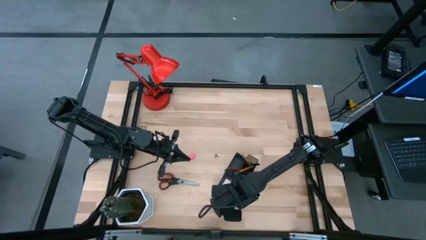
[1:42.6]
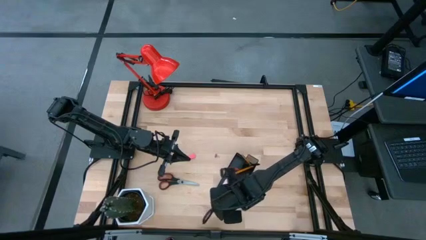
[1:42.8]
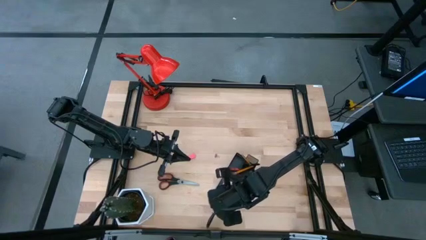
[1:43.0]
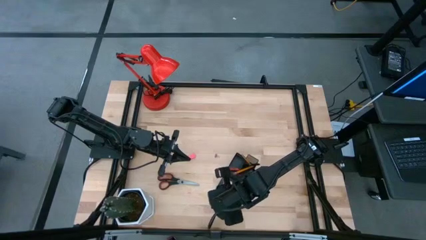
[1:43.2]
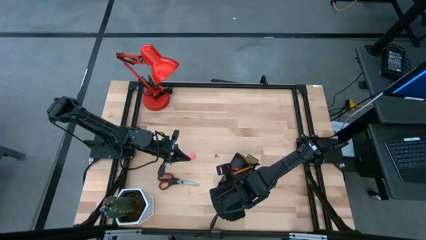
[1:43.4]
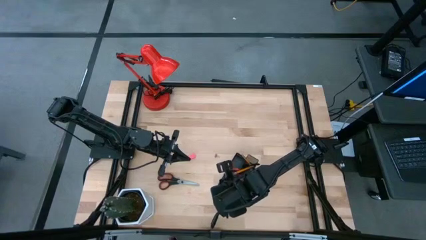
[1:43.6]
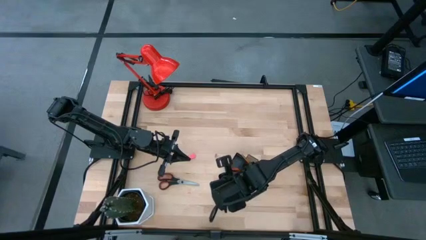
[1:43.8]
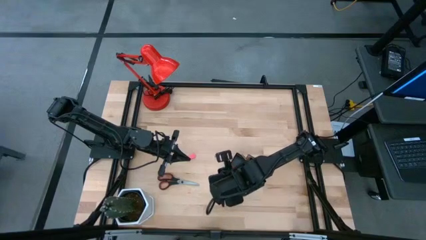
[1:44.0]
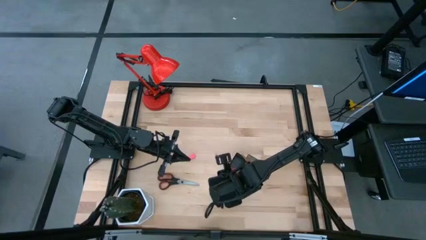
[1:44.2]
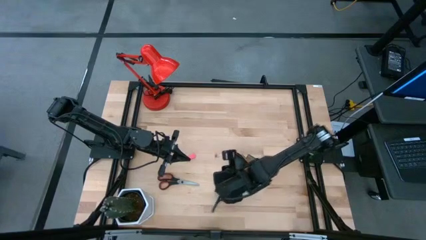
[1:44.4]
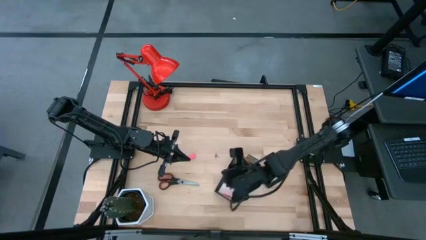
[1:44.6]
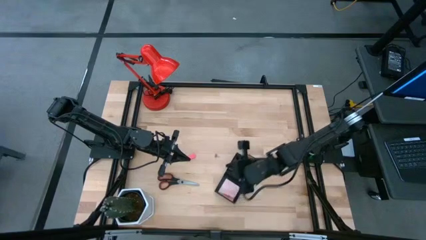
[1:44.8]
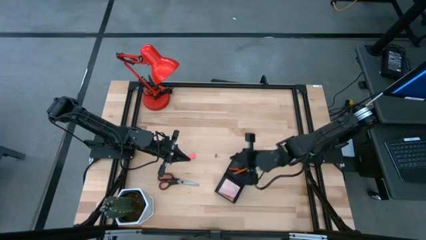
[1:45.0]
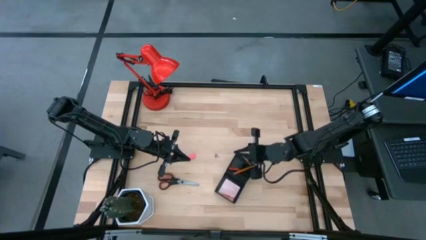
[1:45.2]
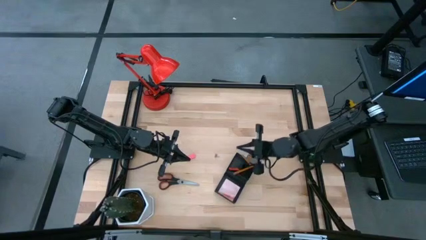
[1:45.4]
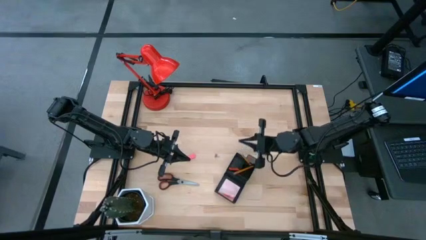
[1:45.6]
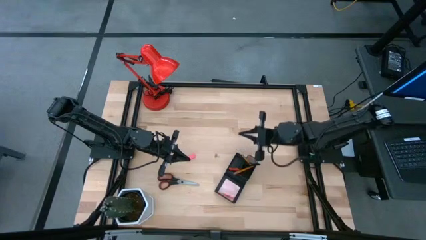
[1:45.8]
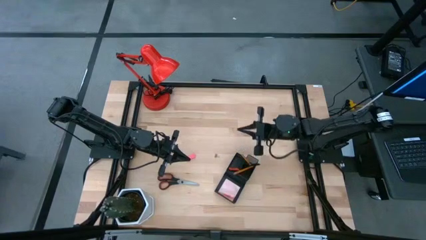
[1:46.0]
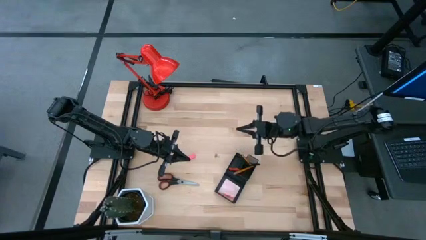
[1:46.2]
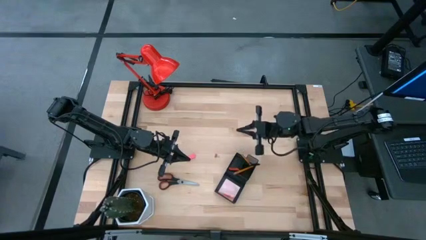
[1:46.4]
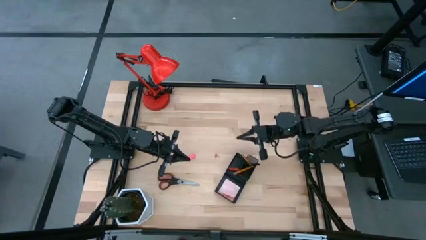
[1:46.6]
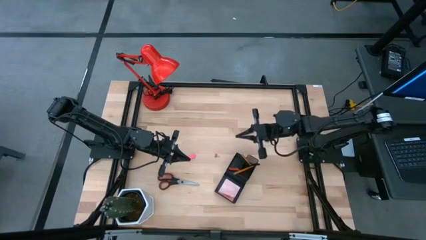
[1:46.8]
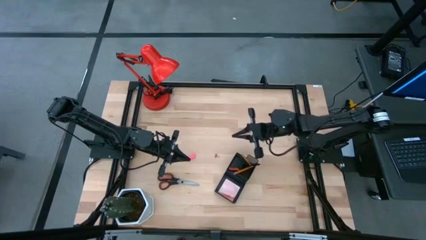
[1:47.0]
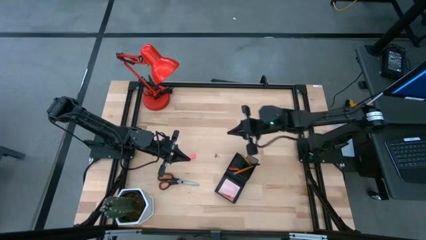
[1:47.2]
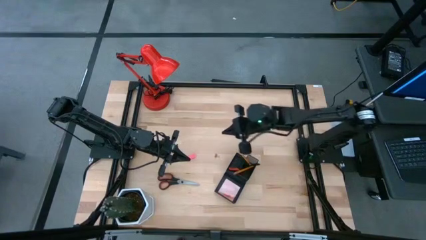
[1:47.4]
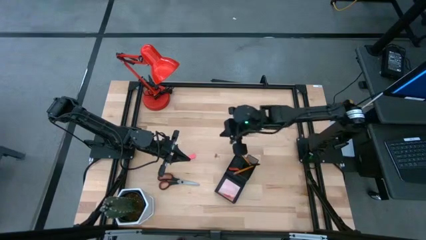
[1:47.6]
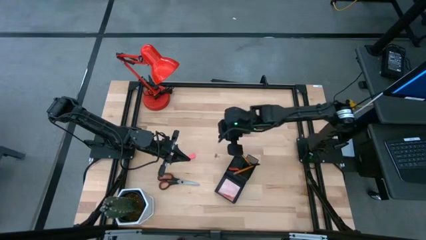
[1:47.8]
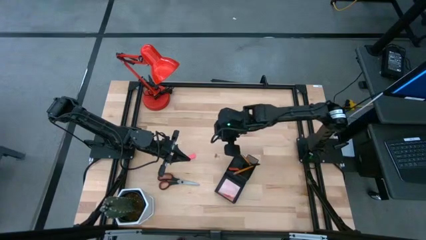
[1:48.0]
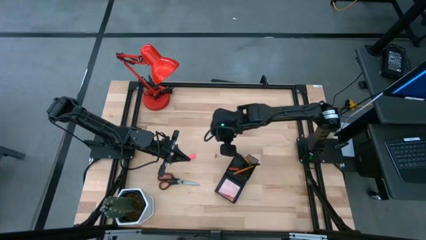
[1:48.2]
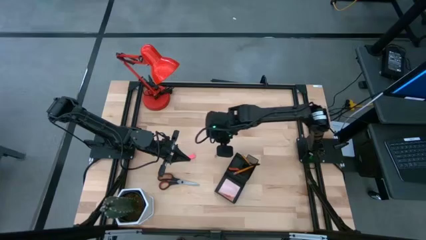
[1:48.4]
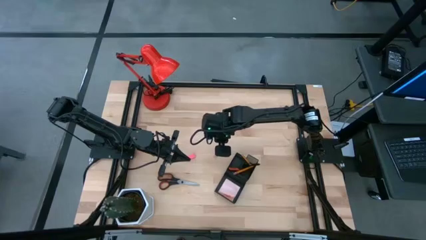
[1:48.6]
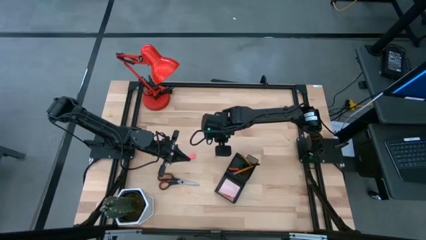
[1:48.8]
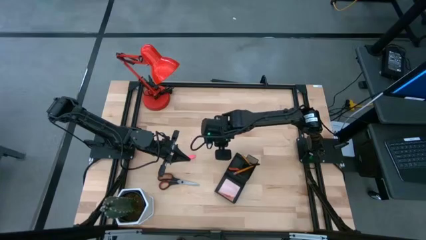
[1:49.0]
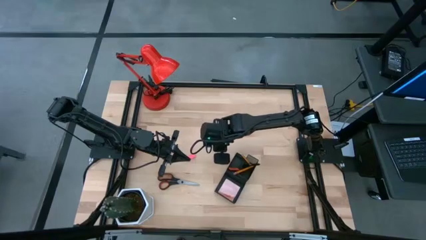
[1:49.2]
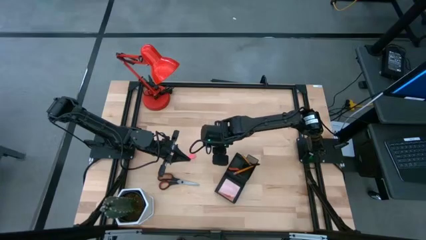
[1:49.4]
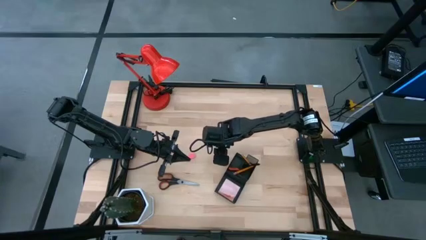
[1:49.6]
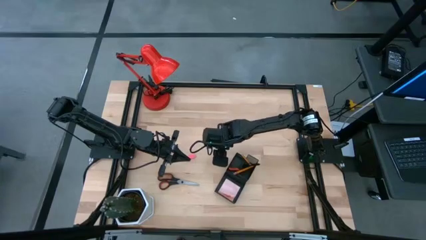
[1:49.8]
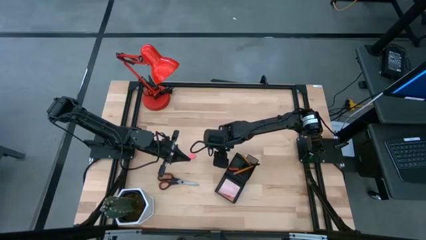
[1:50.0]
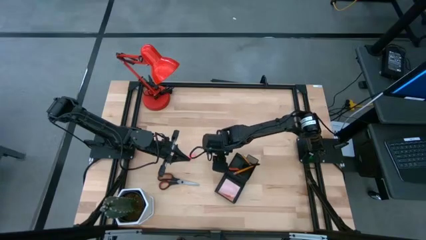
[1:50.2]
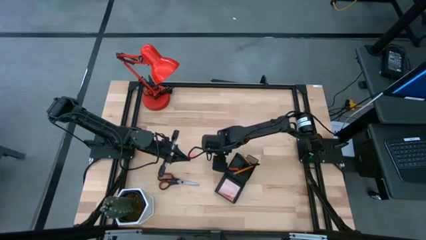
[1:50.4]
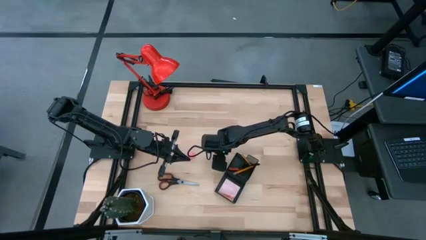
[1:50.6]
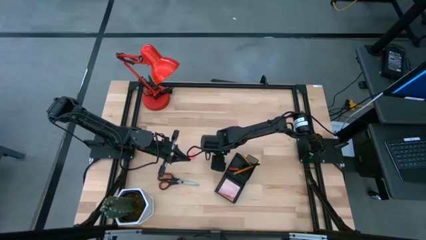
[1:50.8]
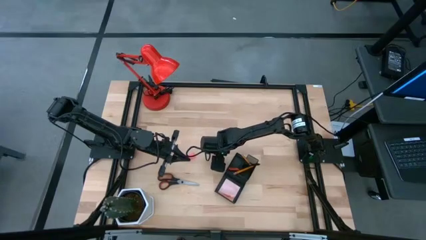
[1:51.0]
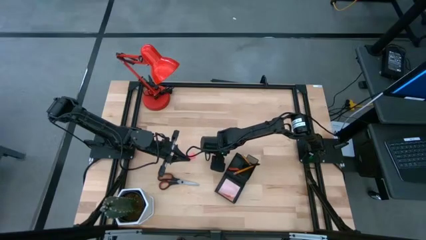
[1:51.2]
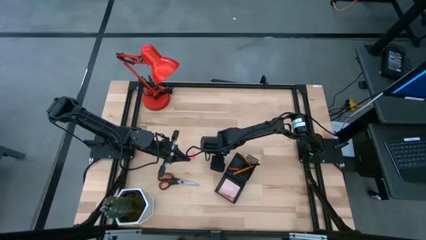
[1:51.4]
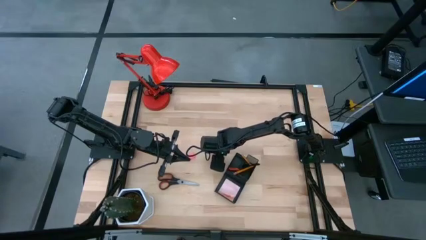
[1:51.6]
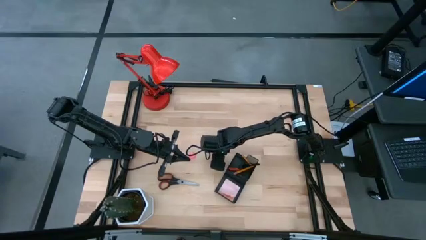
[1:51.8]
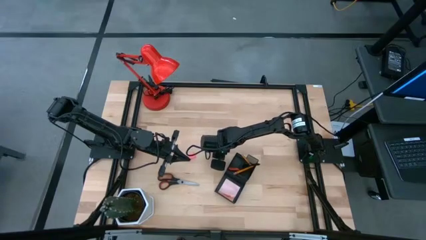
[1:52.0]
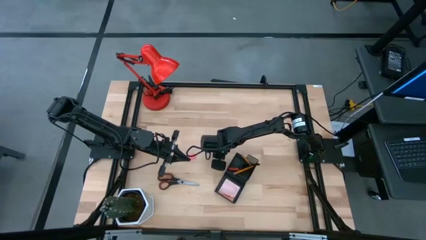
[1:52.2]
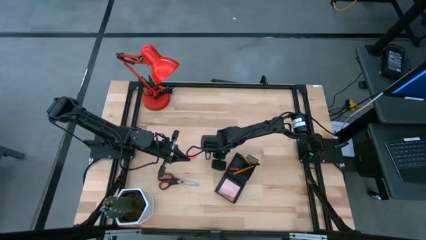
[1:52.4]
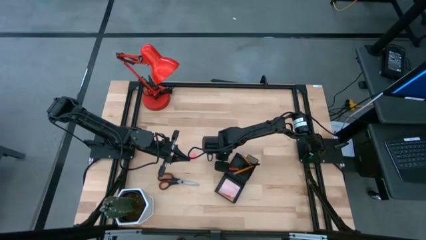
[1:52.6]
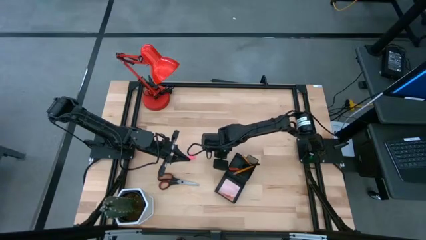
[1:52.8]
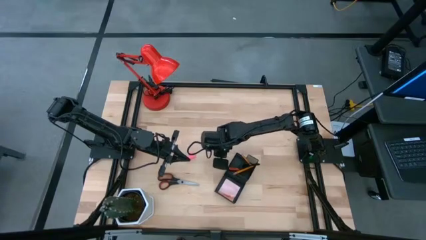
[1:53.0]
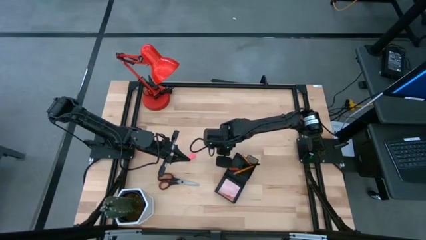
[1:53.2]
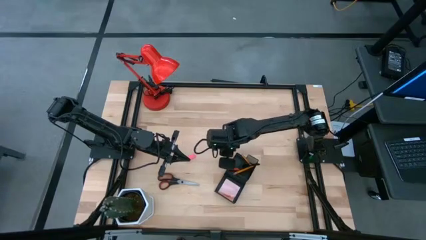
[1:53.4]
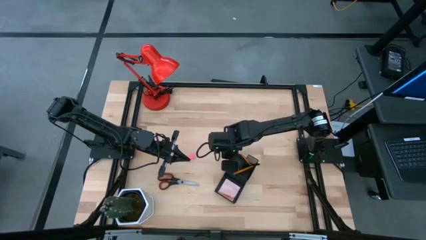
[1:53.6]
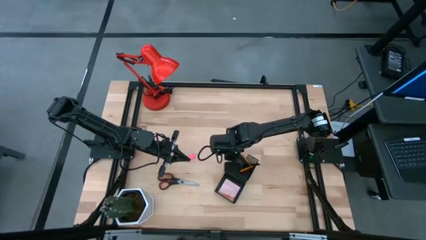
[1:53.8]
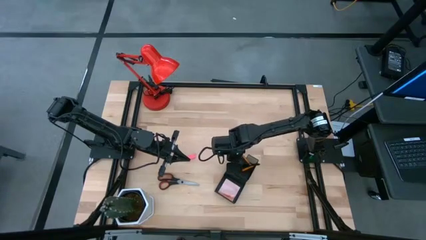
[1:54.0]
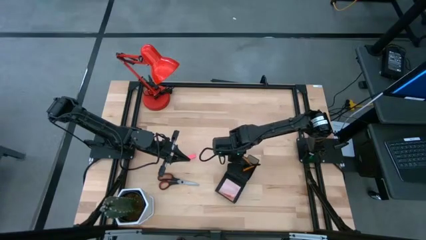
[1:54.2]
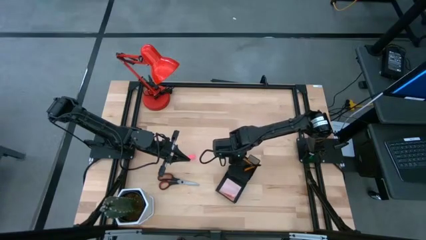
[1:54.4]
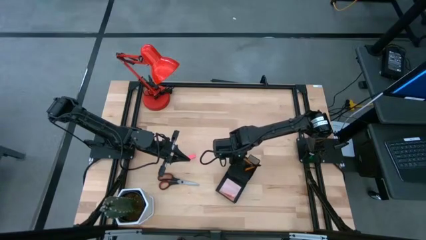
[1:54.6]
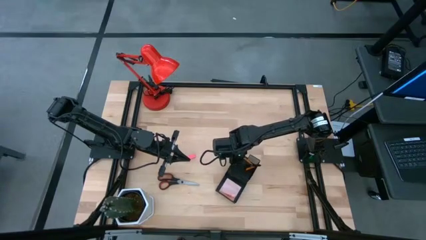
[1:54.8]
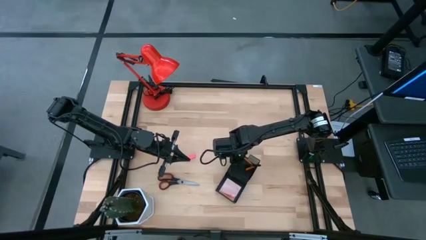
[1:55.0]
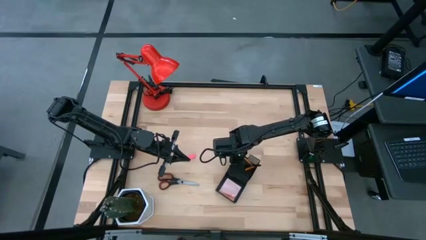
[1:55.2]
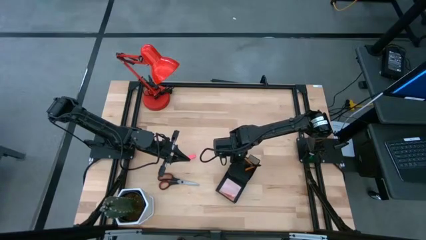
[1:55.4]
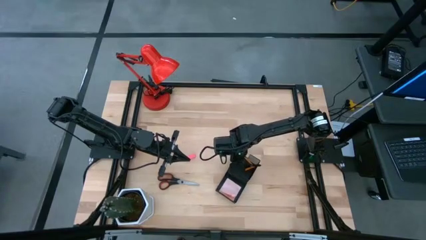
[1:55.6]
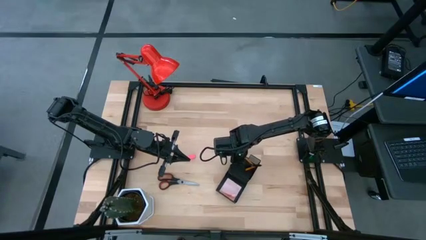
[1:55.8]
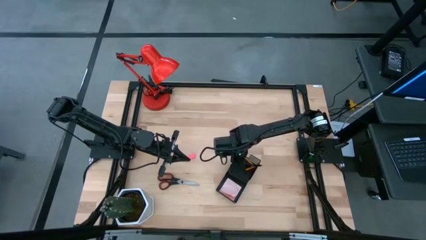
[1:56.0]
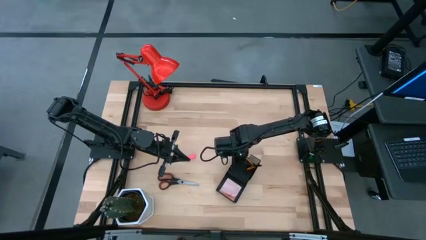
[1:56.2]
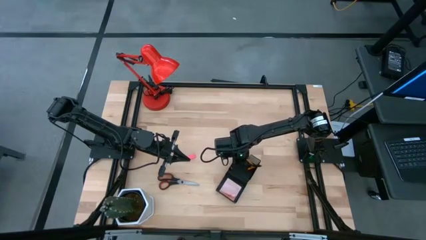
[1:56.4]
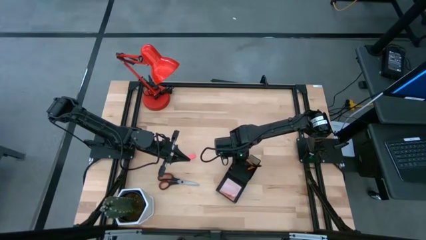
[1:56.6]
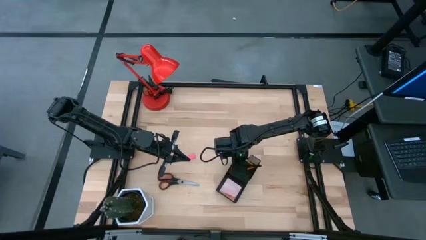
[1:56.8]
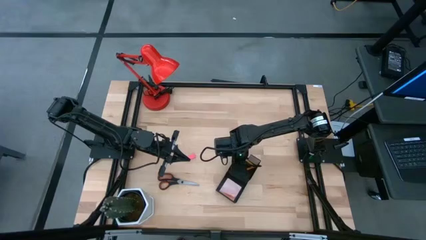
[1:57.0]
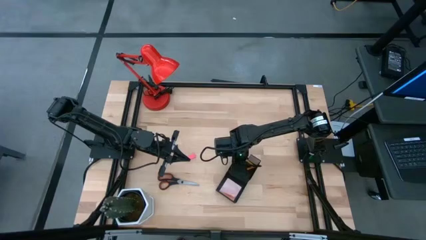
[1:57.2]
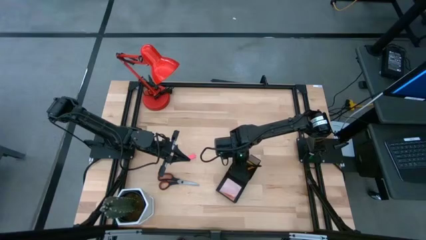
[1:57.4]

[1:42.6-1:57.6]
Task: Pick and place office supplies into organizer
Put the pink binder clip into the desk organizer
